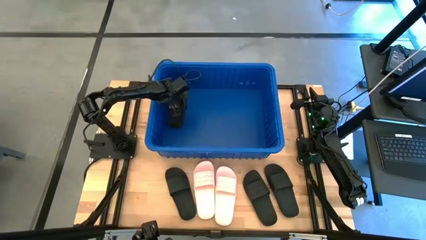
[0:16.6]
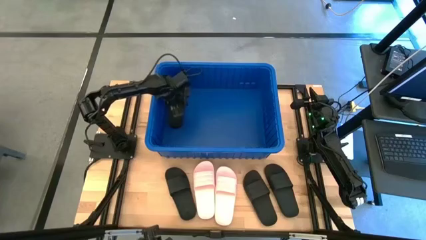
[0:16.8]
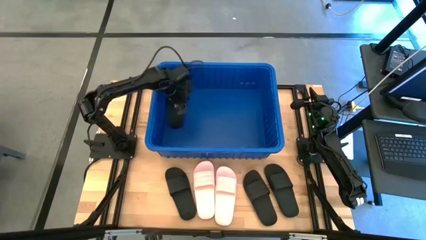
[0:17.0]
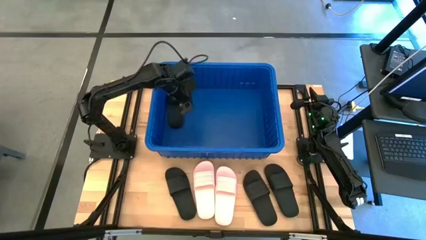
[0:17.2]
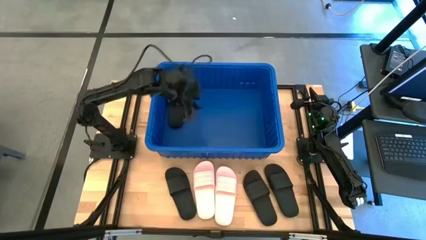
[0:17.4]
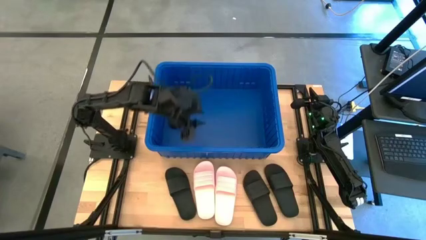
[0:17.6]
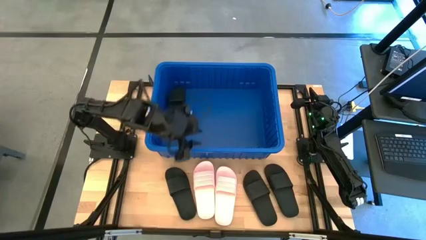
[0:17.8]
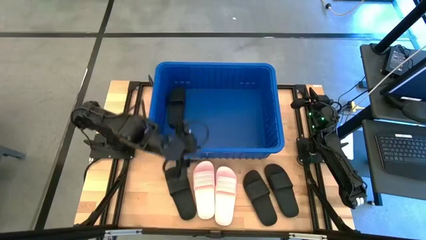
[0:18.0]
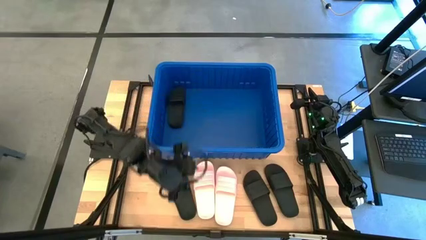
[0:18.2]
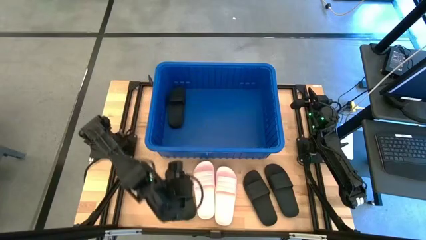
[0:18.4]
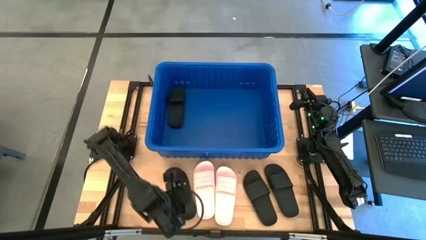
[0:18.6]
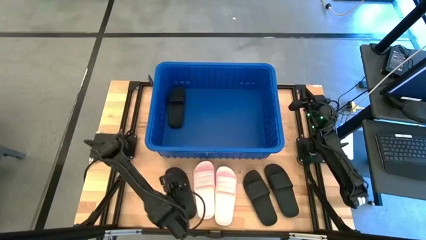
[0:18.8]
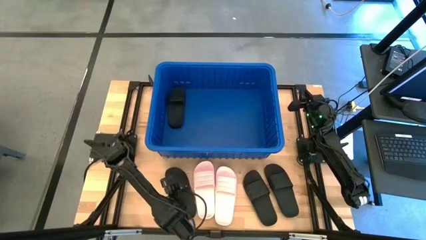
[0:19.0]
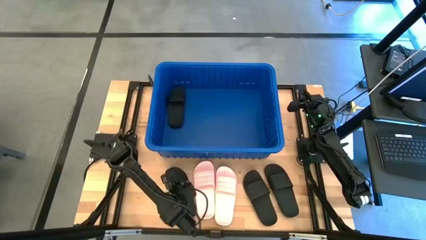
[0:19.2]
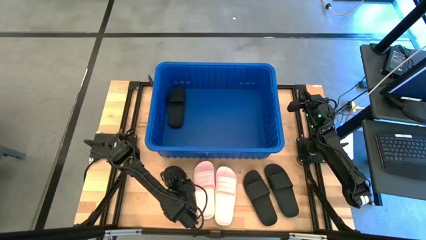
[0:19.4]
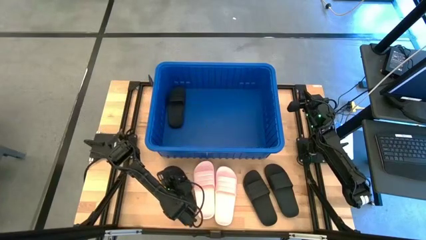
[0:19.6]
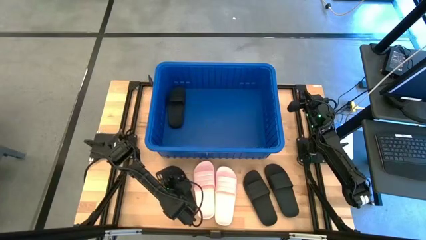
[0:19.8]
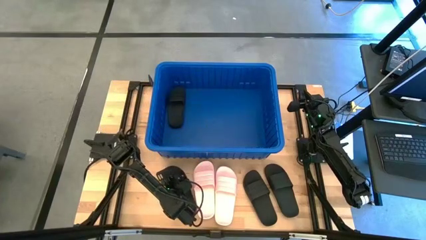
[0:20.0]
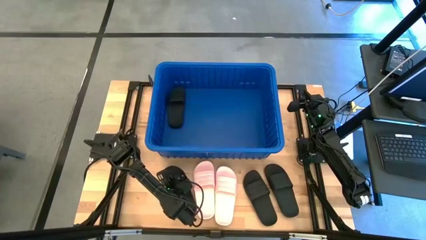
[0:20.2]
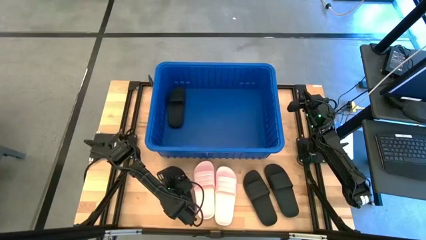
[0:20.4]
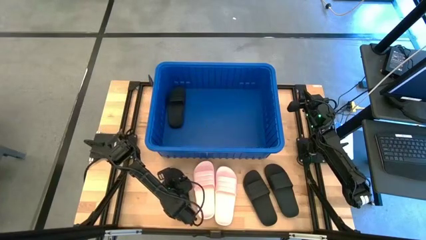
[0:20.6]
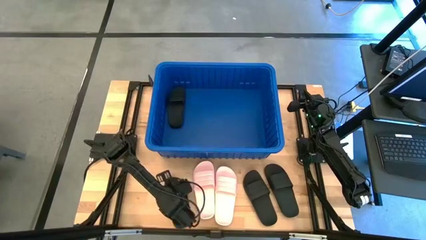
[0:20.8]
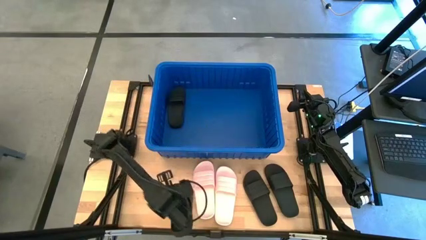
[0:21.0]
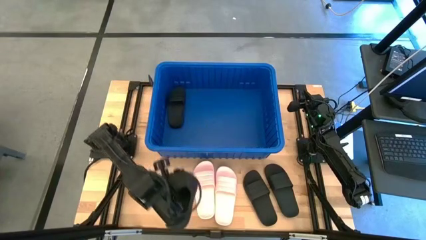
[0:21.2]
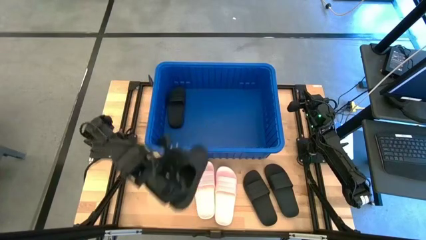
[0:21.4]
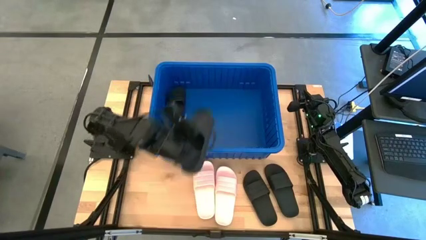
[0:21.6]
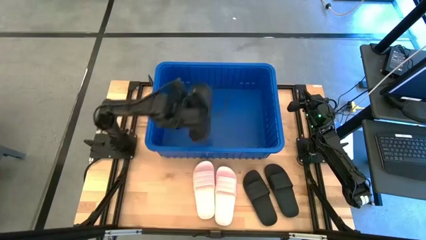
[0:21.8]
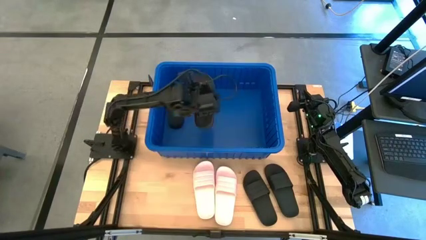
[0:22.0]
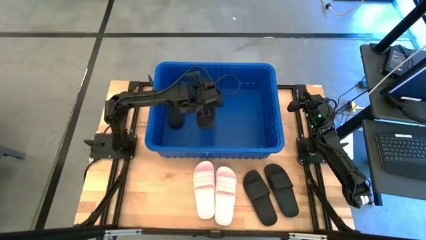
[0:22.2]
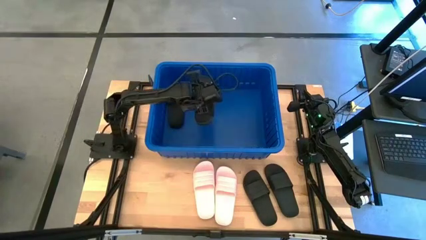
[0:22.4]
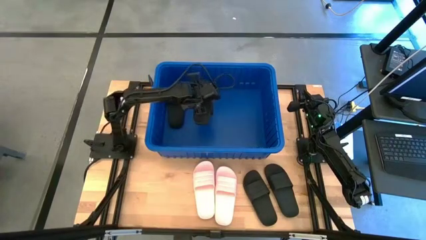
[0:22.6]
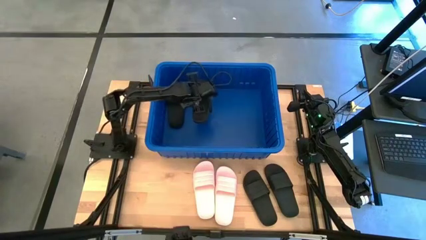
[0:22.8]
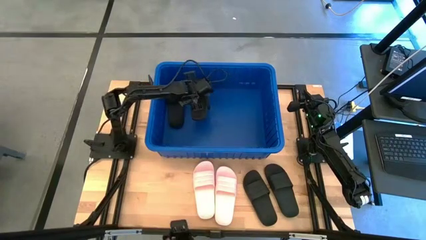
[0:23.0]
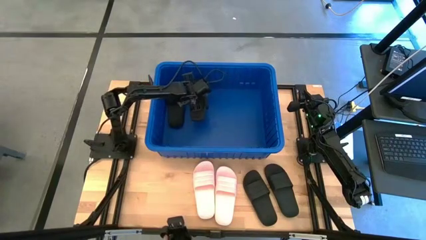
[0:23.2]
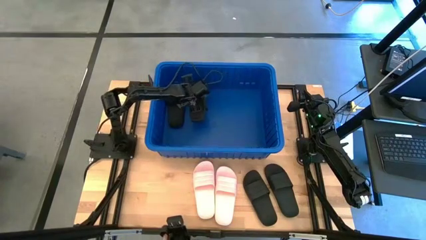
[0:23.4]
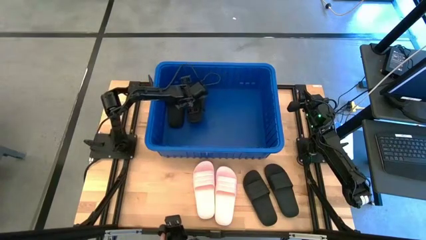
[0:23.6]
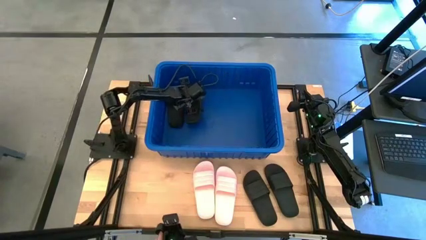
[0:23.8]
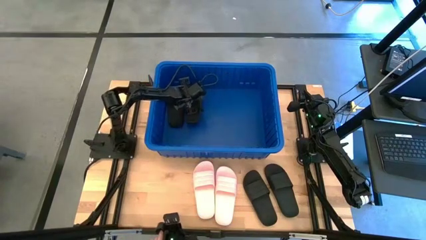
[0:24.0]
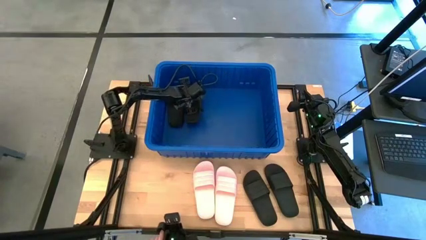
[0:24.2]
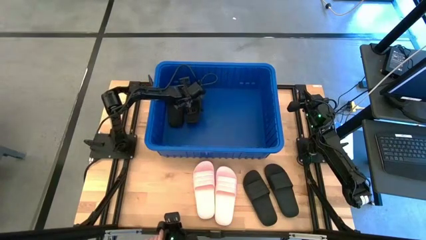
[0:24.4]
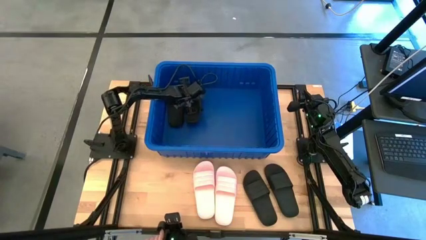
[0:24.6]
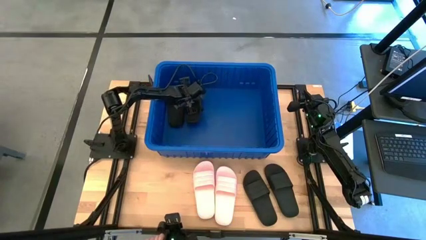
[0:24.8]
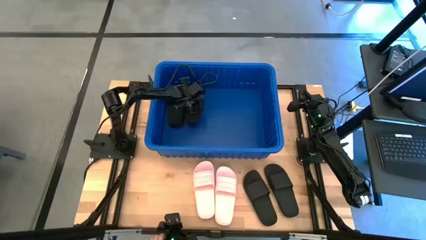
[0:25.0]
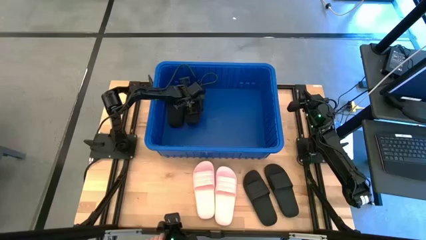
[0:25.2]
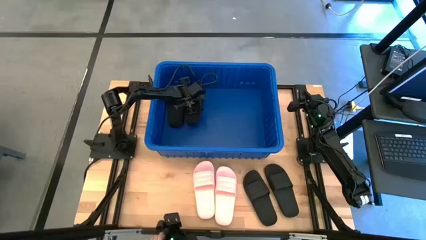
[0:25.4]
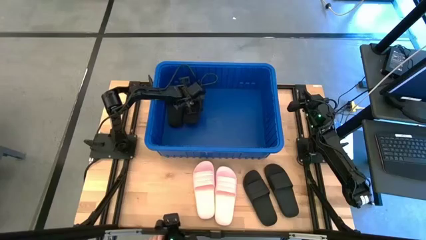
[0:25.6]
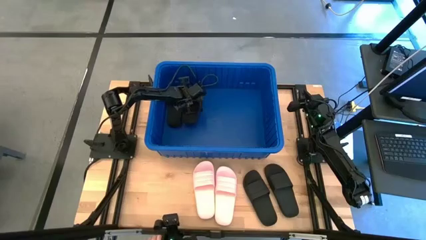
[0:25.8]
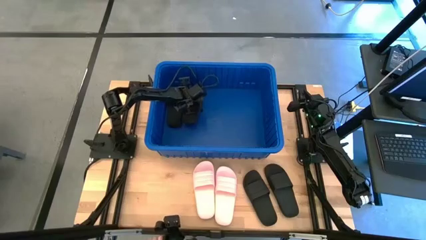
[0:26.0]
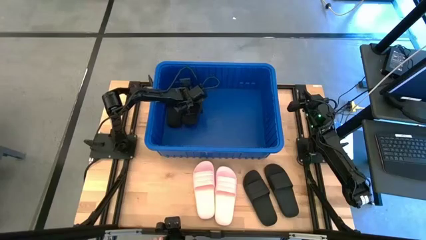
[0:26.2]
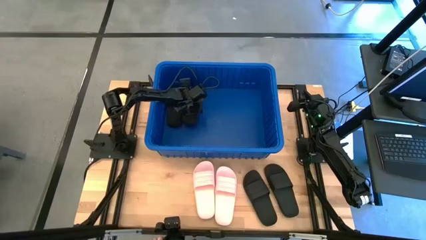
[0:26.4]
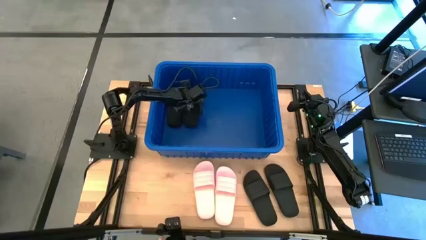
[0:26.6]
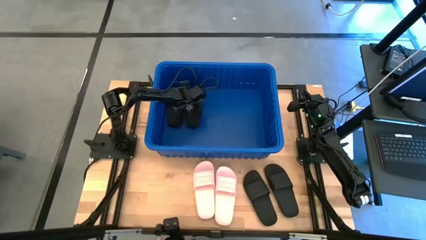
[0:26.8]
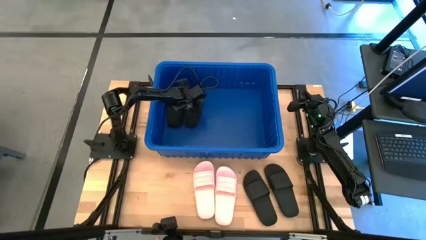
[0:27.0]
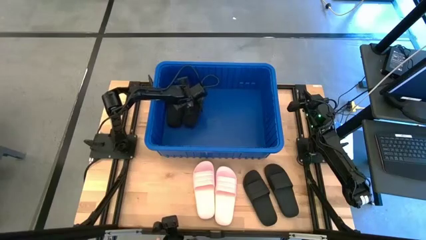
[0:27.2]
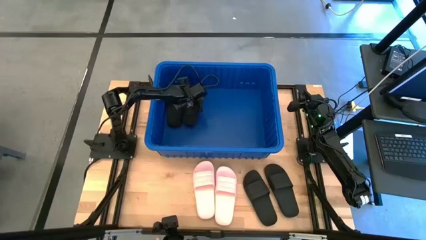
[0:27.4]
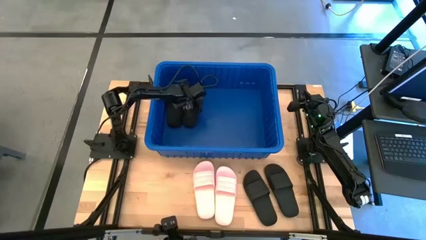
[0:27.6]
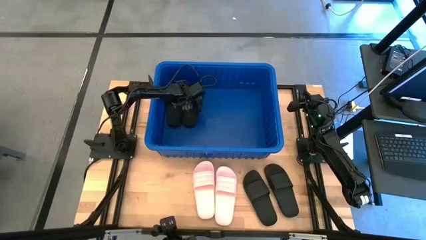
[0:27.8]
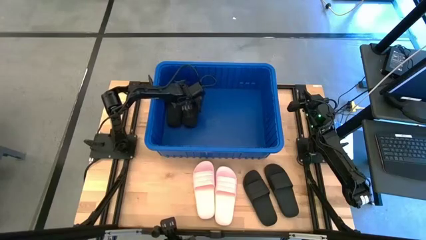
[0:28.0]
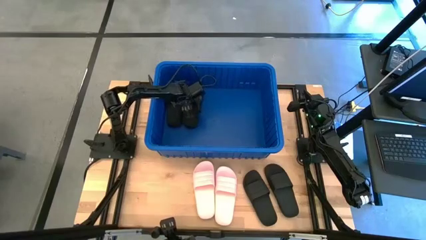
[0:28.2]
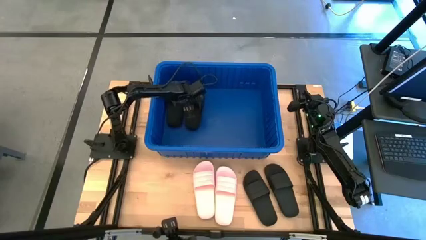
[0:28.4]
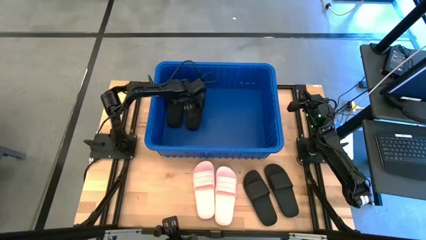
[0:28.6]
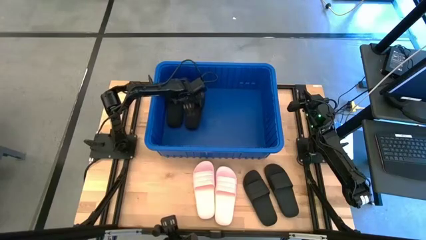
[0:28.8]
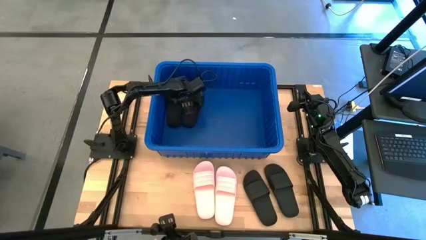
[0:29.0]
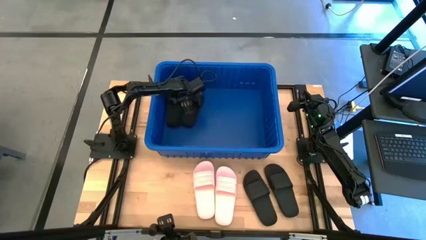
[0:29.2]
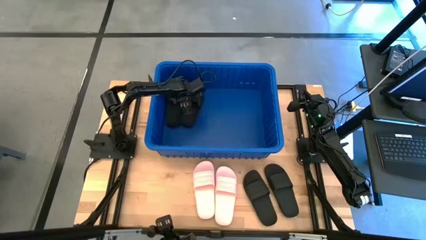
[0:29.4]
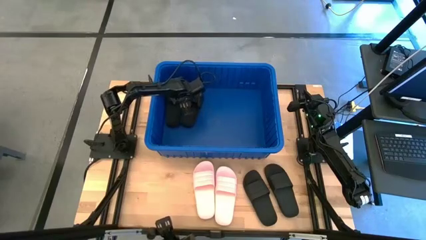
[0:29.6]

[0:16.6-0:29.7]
Task: Pick and place slides into bin
Put the black slide into the blue bin

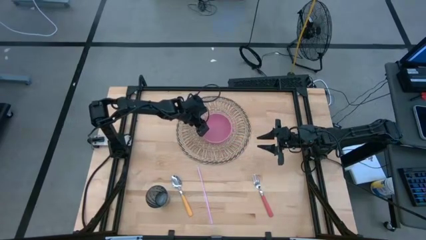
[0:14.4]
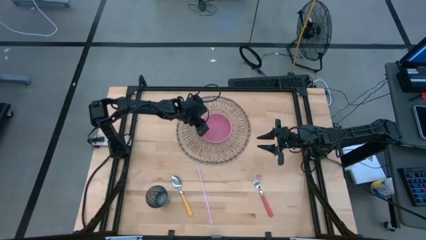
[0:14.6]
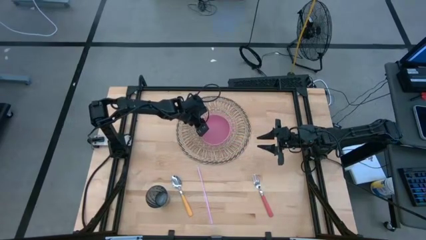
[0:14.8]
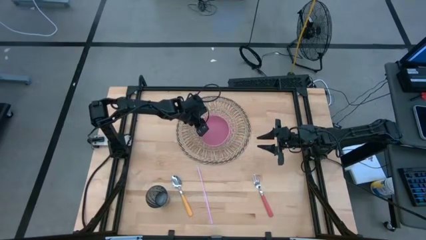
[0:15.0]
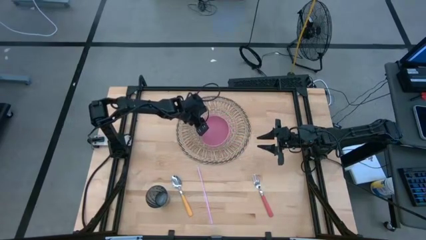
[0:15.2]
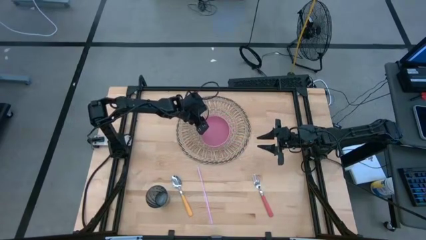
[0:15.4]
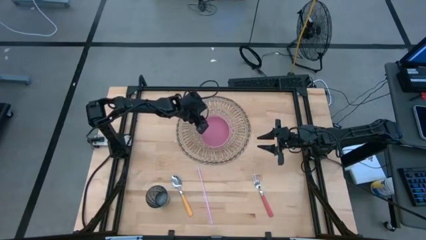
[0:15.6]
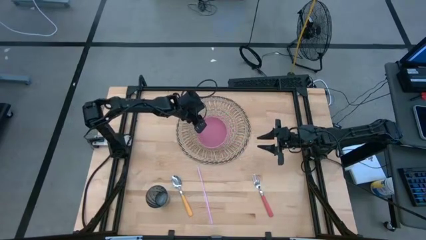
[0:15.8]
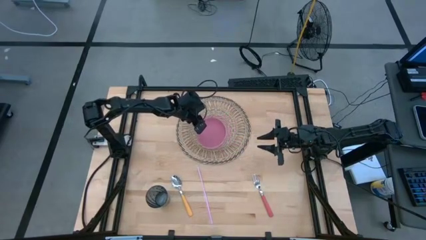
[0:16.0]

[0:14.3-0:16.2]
Task: Pick & Place Utensil
Put the pink bowl on the middle left of the brown placemat
